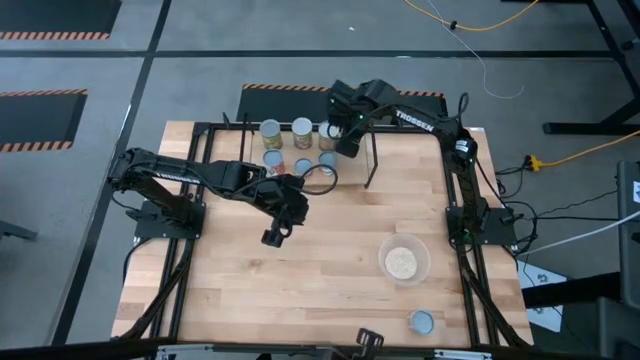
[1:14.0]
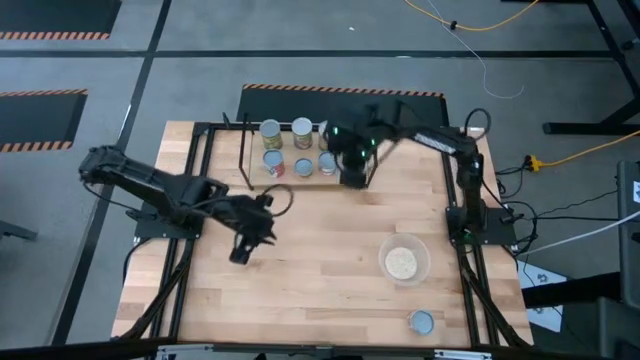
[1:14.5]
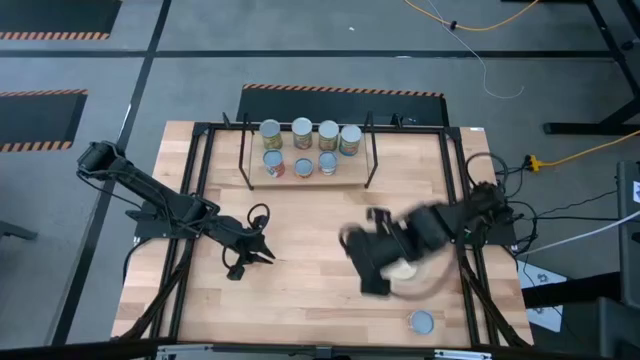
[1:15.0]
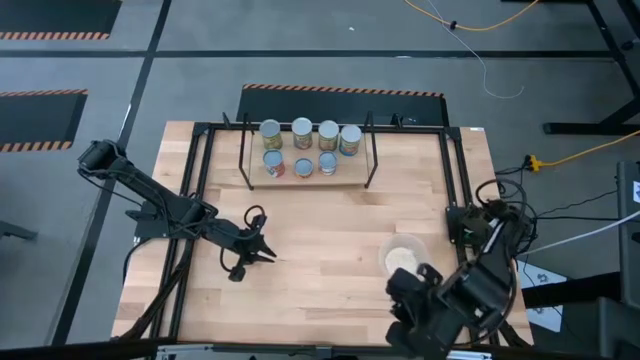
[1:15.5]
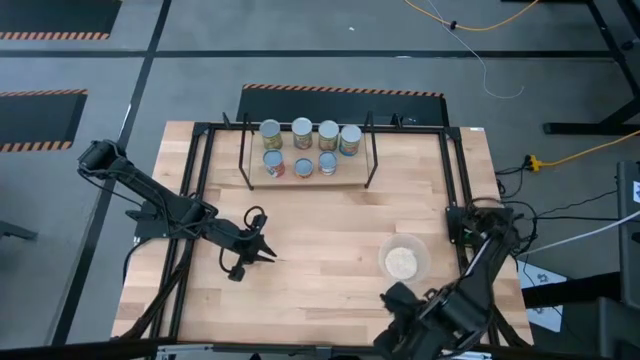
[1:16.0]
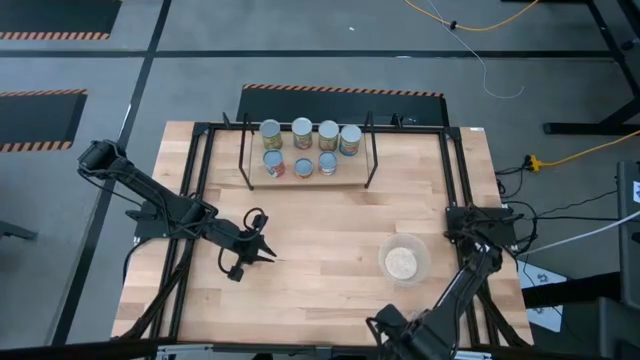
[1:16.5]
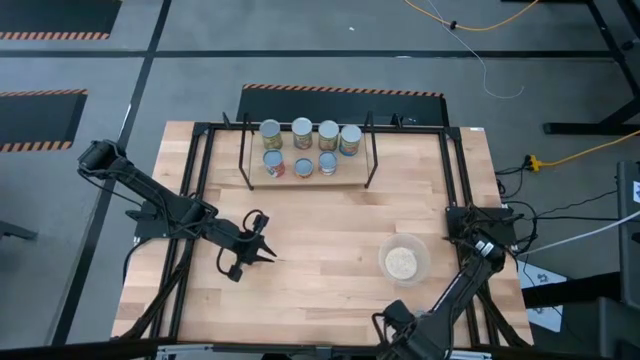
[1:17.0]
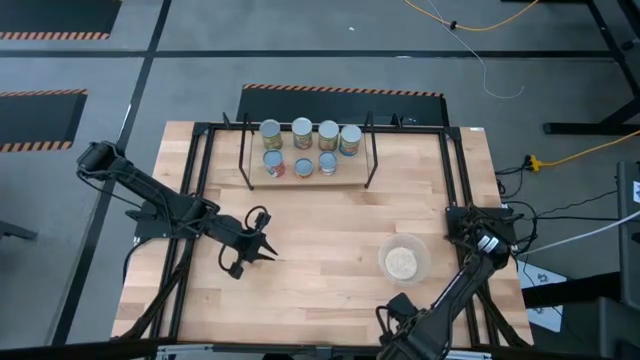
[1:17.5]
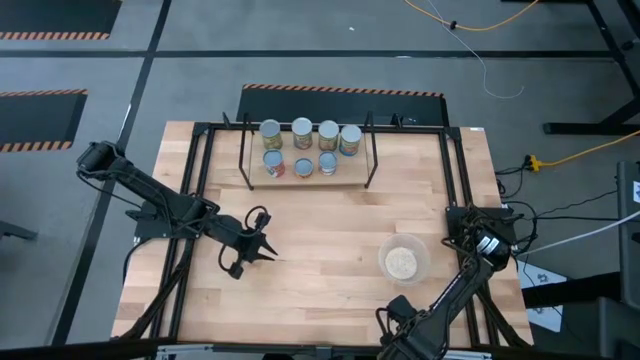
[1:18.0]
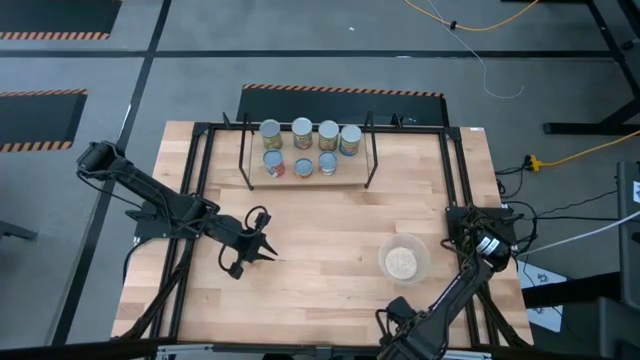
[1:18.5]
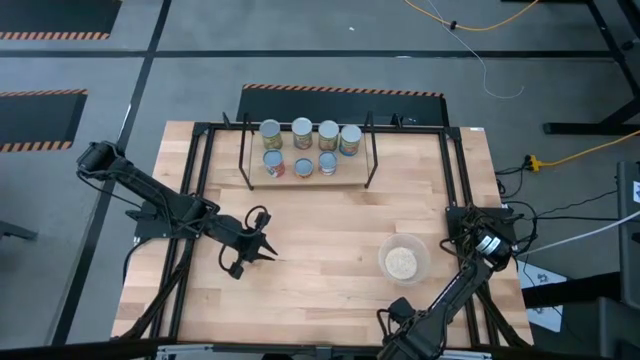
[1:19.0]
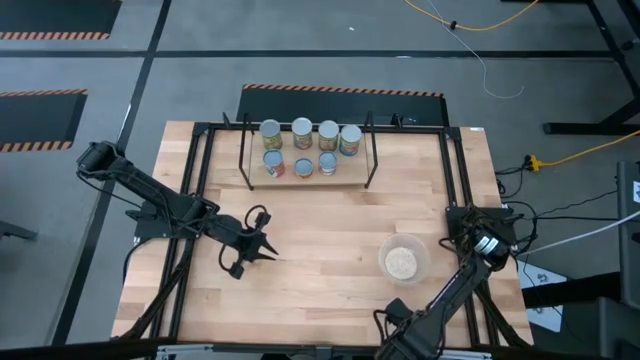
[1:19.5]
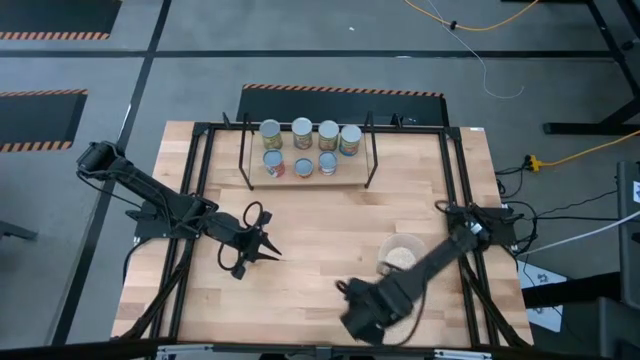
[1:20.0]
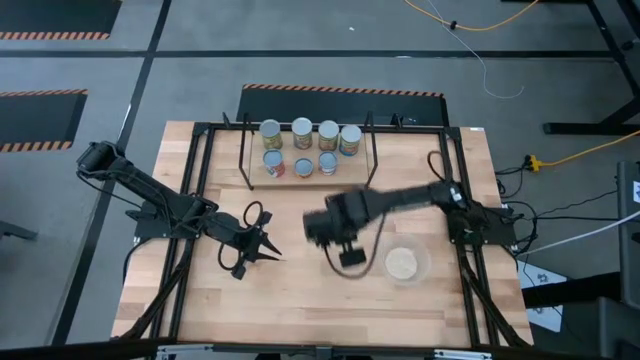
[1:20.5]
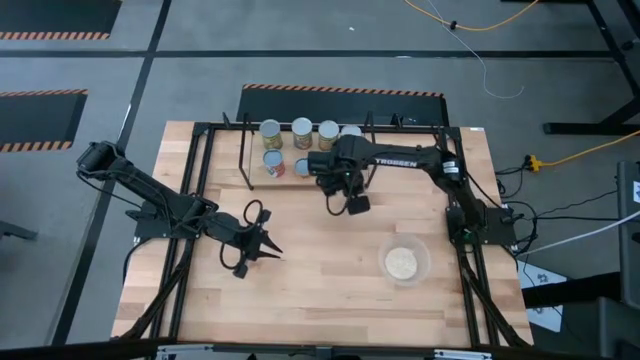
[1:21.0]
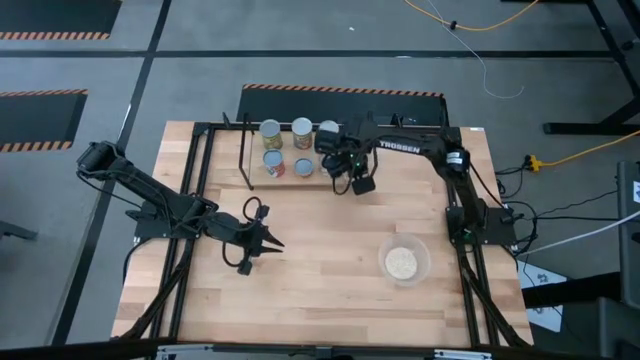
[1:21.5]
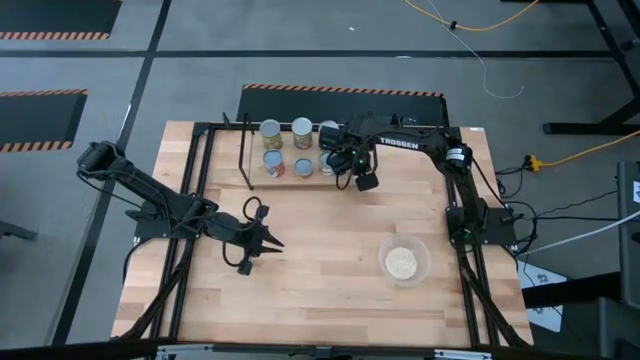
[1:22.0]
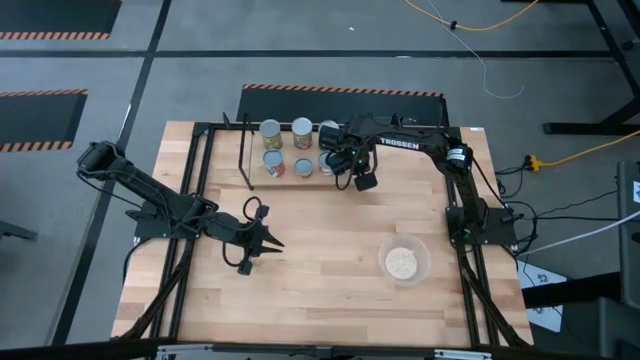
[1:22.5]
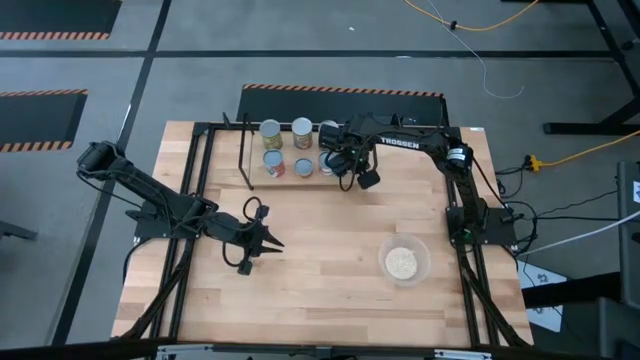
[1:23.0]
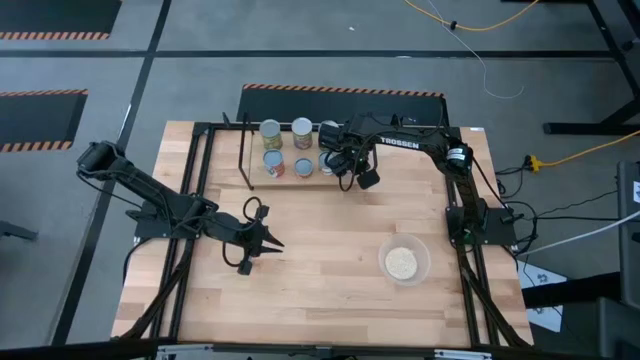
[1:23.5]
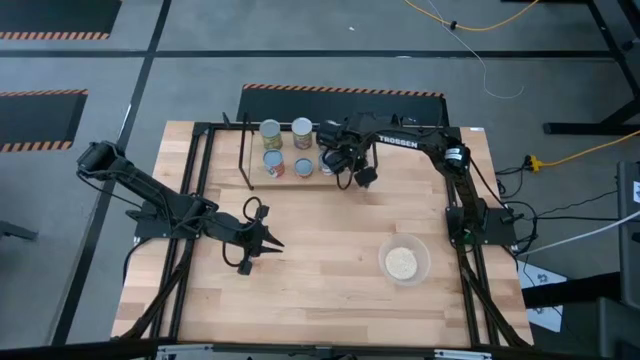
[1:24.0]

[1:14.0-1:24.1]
Task: Pick and place cans onto a shelf
Put the canned diced tomatoes on the shelf

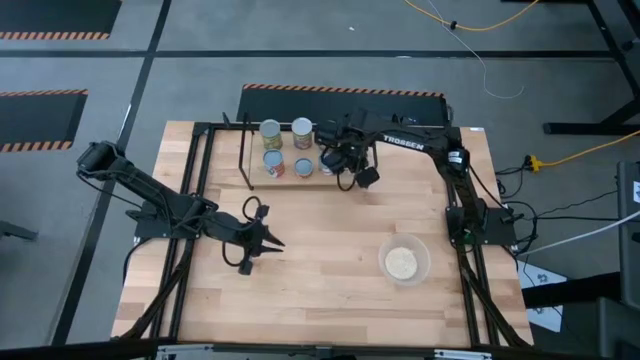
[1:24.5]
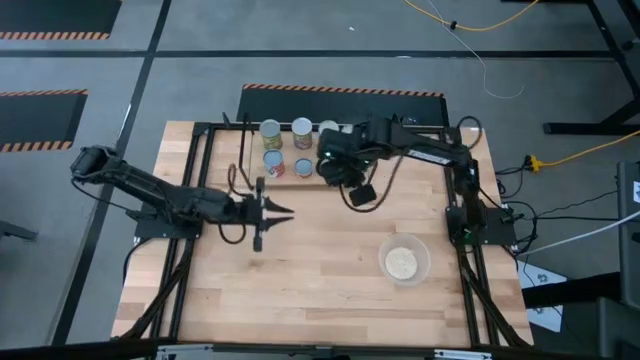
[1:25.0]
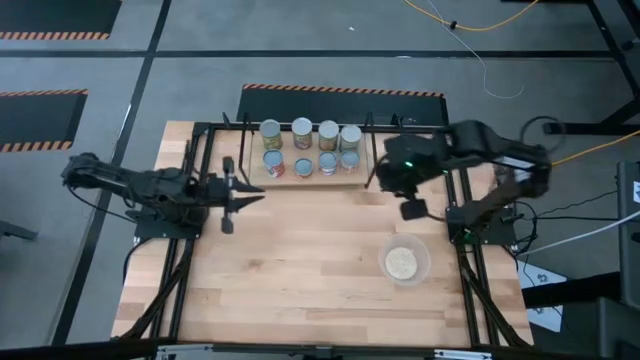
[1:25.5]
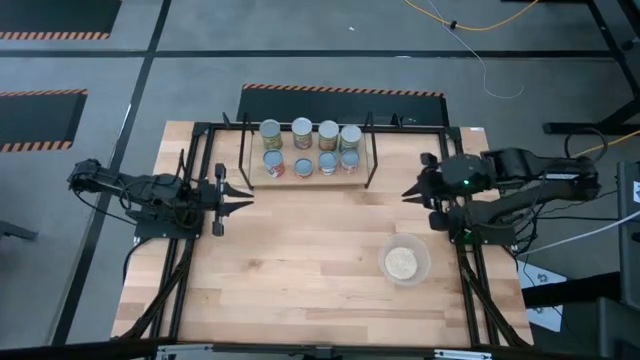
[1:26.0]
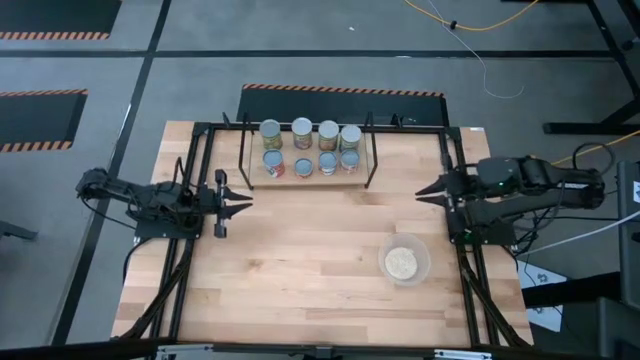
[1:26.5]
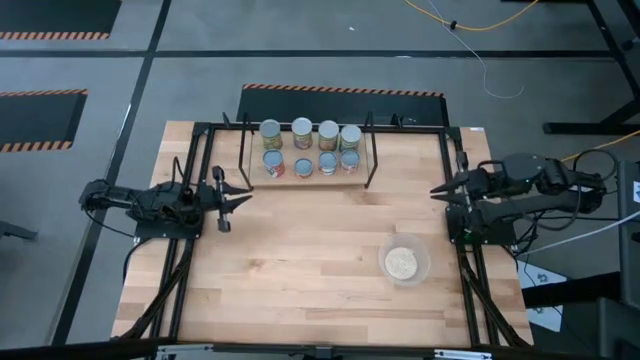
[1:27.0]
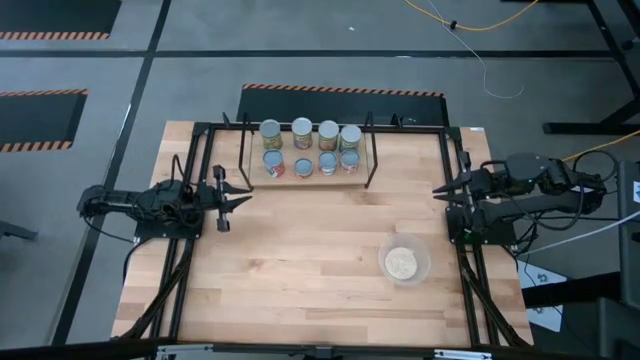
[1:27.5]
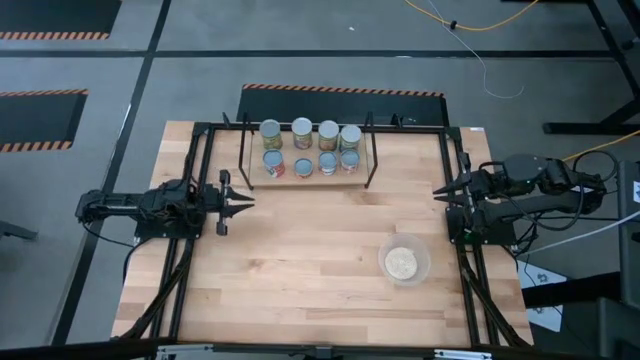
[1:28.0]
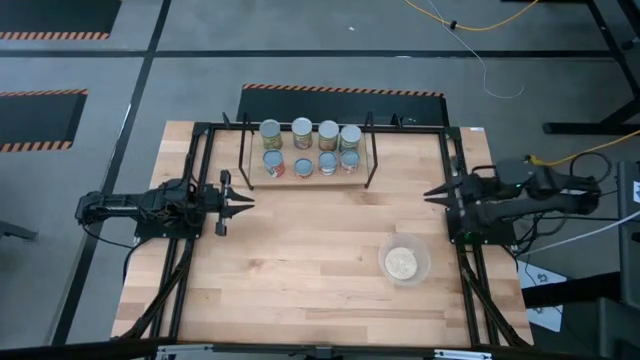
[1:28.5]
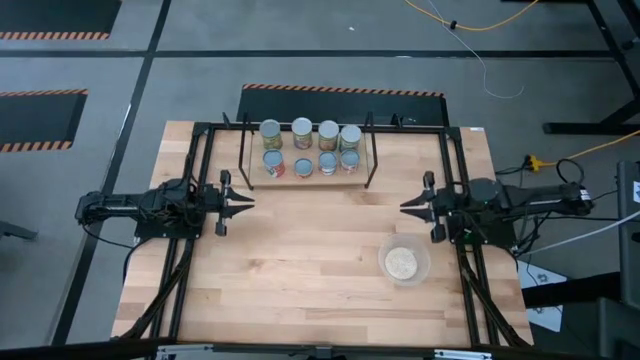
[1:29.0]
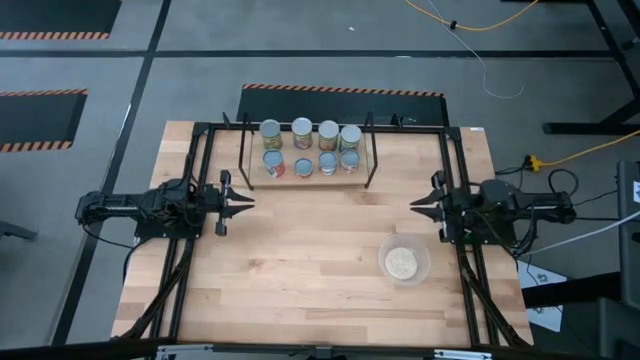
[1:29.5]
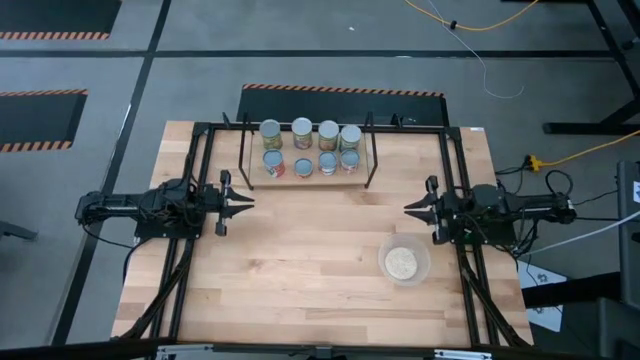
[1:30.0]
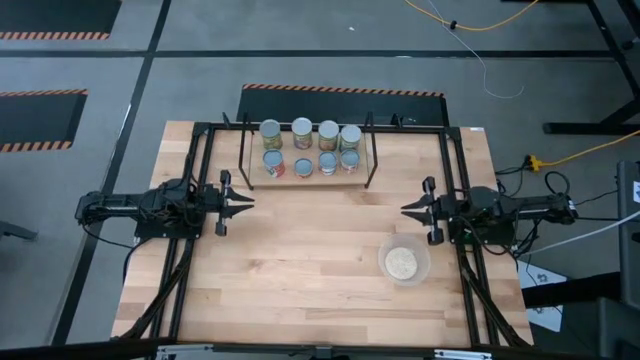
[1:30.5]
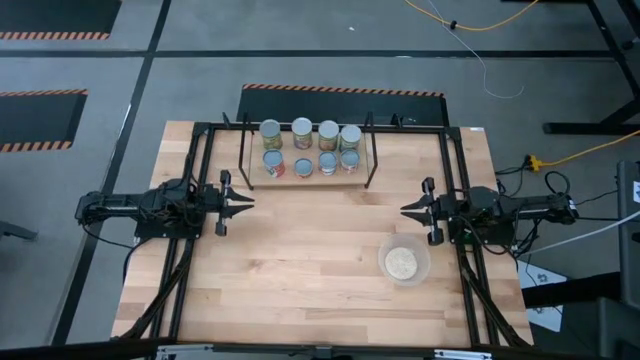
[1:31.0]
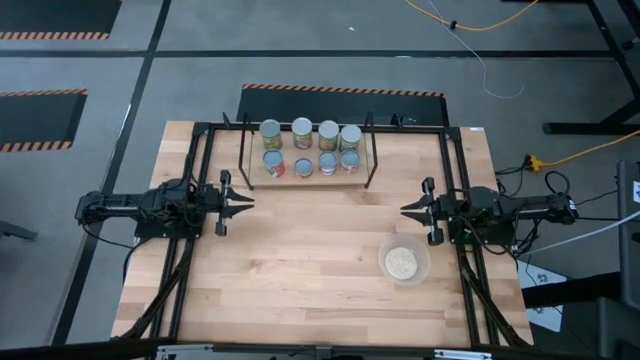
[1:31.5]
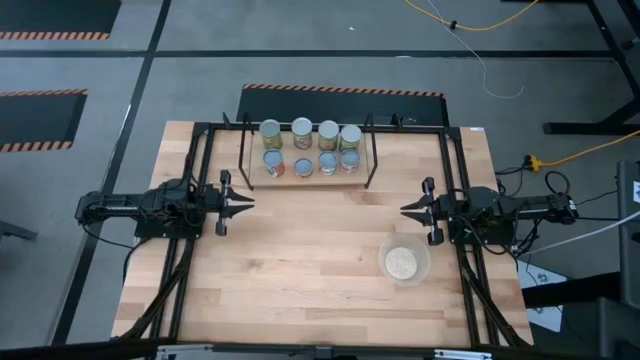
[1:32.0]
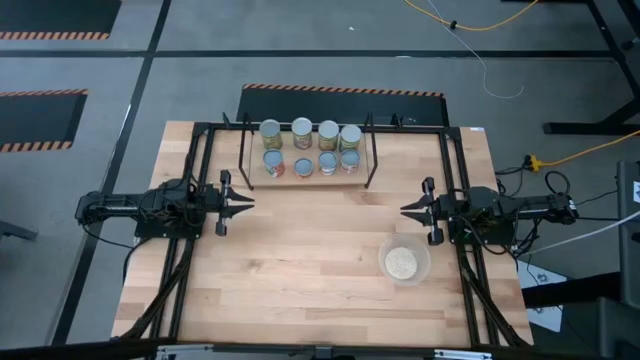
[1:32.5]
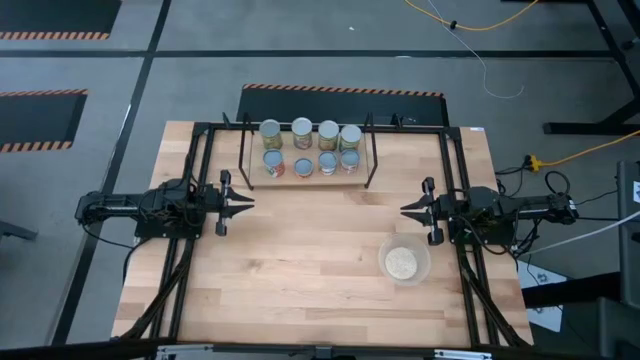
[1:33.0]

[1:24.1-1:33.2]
Return to Home Position

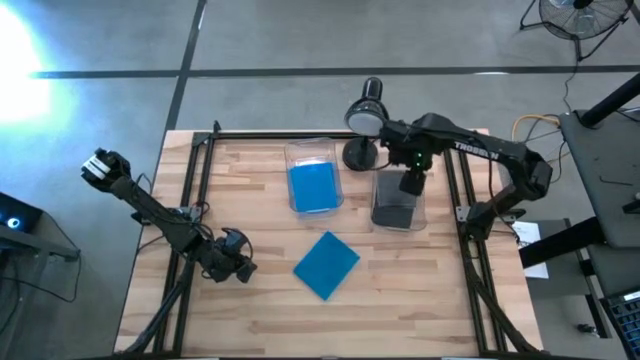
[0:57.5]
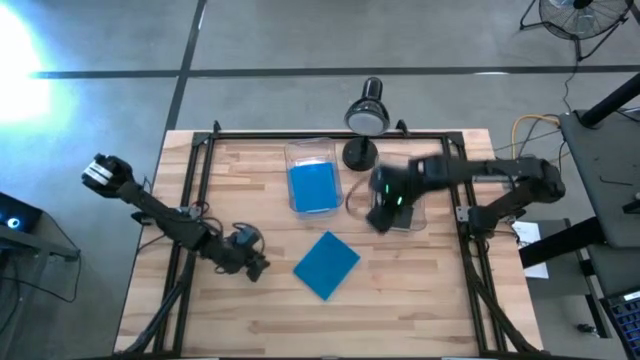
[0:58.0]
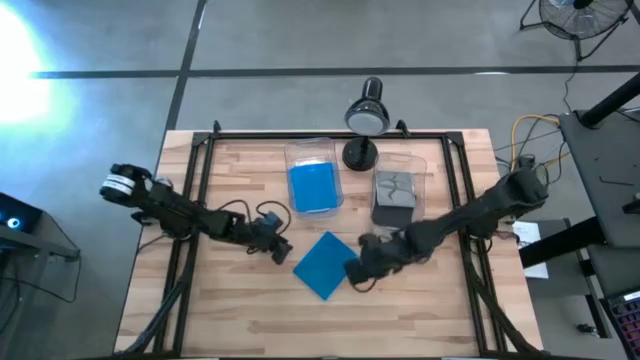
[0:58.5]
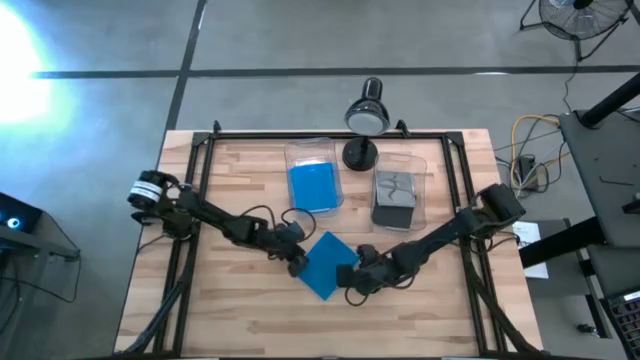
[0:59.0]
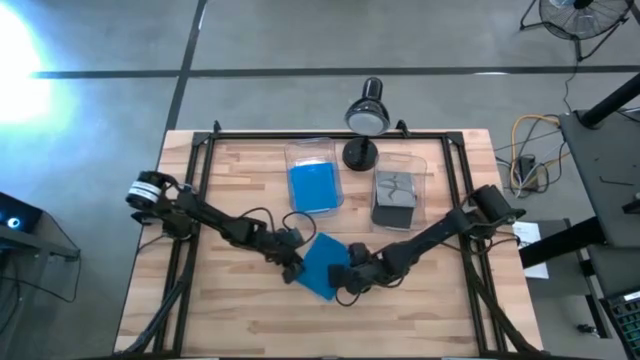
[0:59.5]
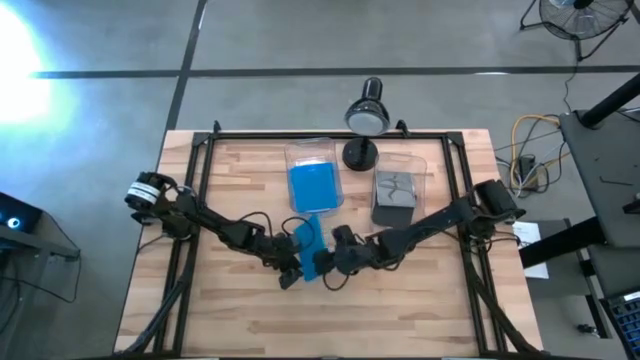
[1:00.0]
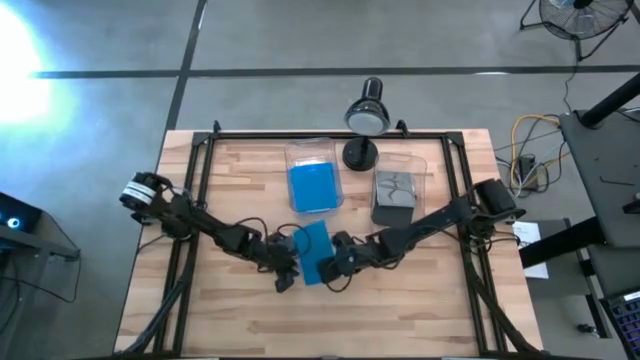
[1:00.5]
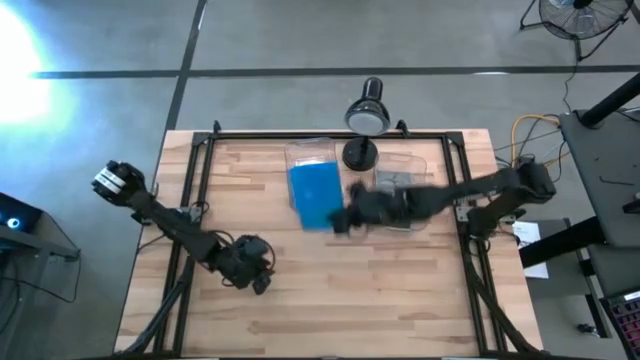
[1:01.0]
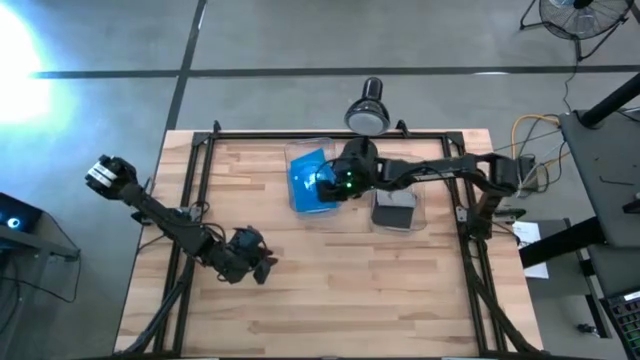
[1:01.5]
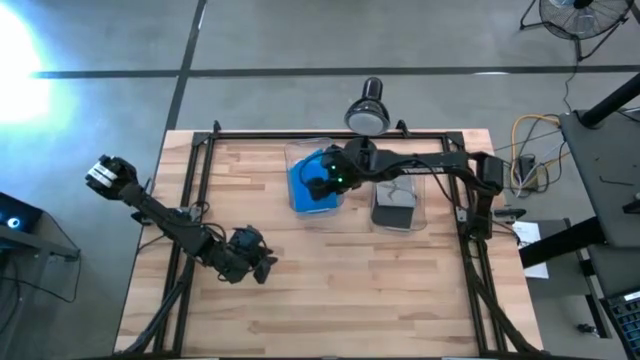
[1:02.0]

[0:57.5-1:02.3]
Task: Pick & place jewel cases by type
Put the blue CD case into the left transparent bin
